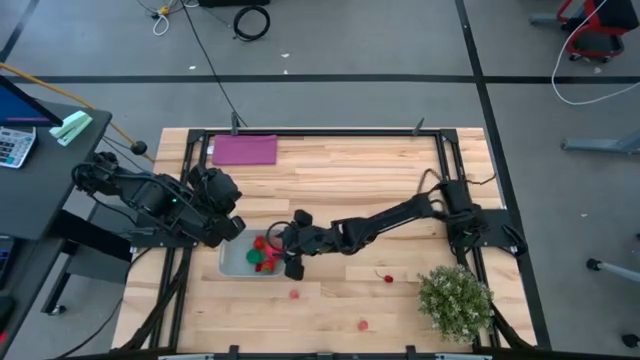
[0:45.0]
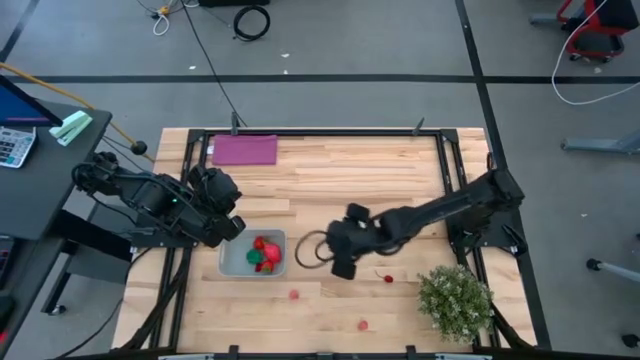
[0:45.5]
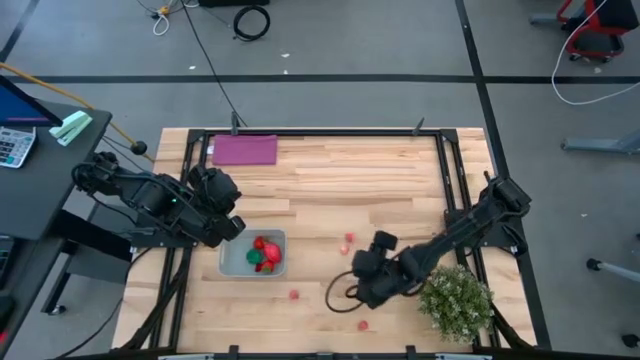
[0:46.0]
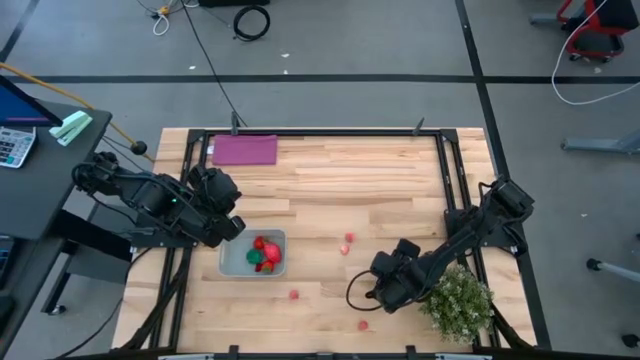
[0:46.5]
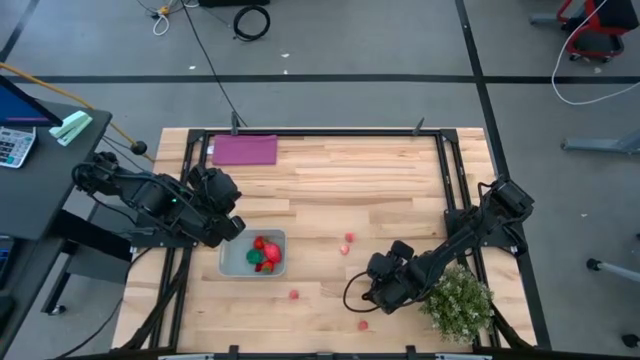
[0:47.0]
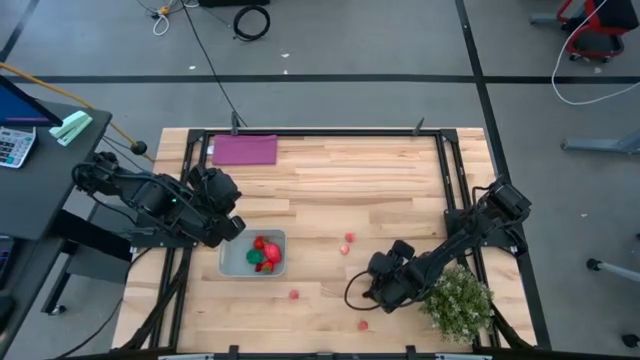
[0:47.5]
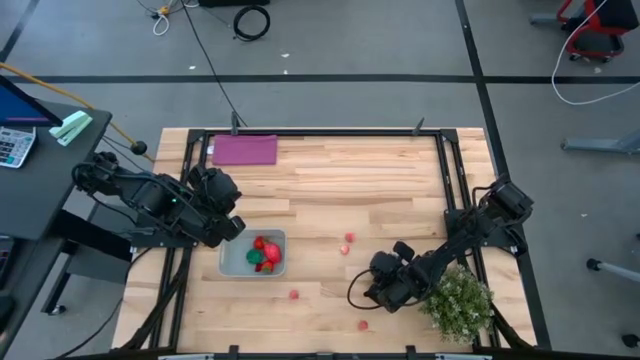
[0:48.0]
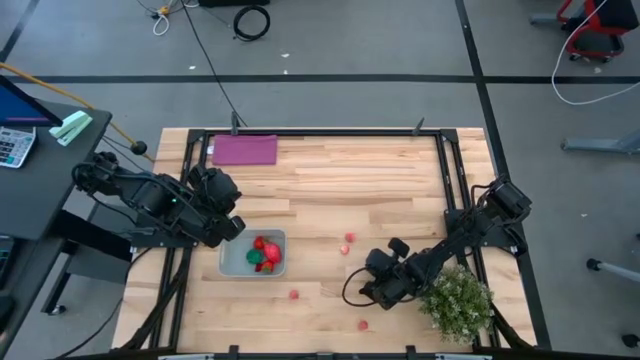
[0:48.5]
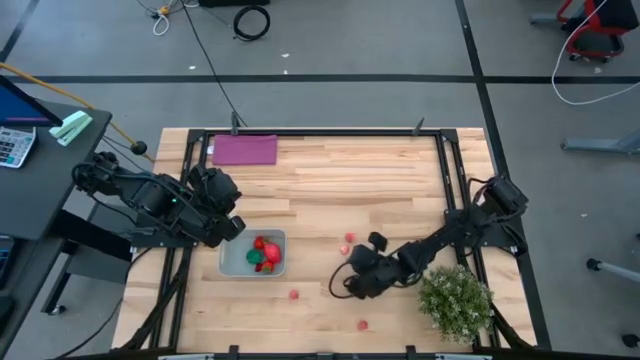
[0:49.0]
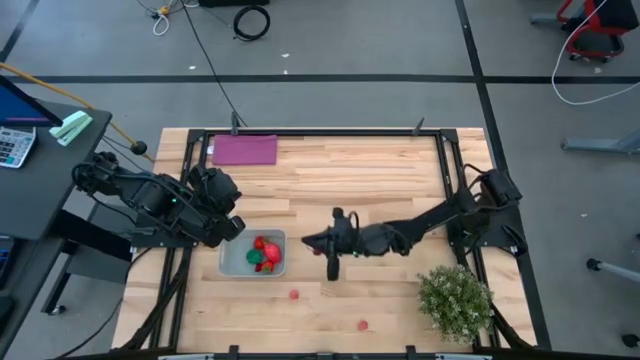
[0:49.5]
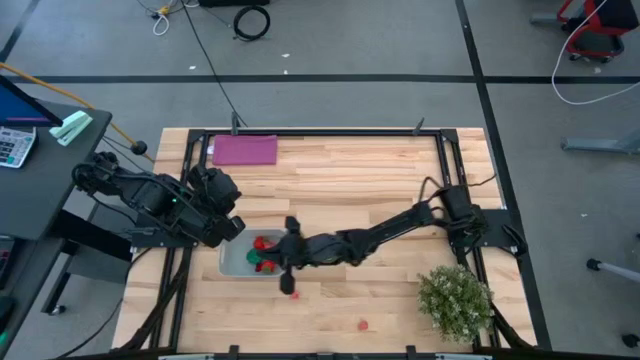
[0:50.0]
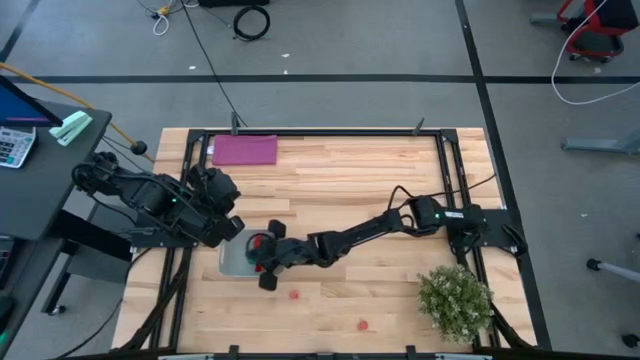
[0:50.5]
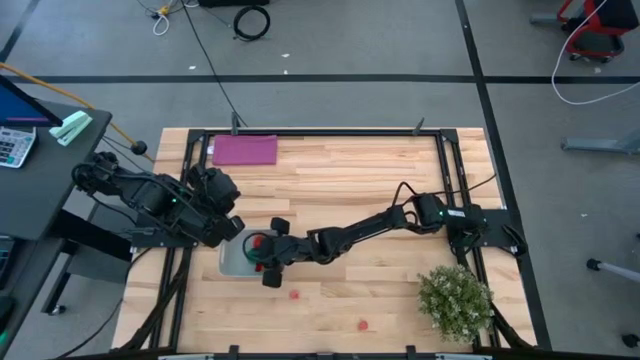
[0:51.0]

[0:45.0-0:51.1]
Task: Pick and placing Produce into tupperware
Put the red cherry into the gray container

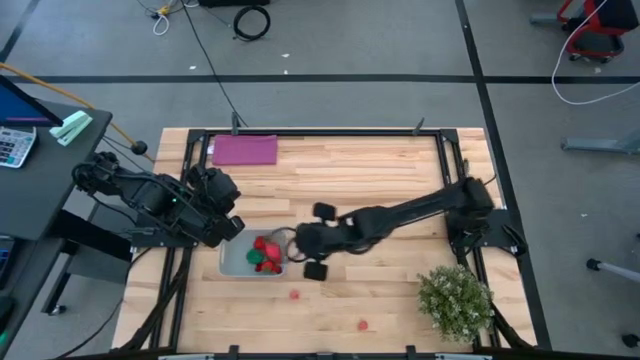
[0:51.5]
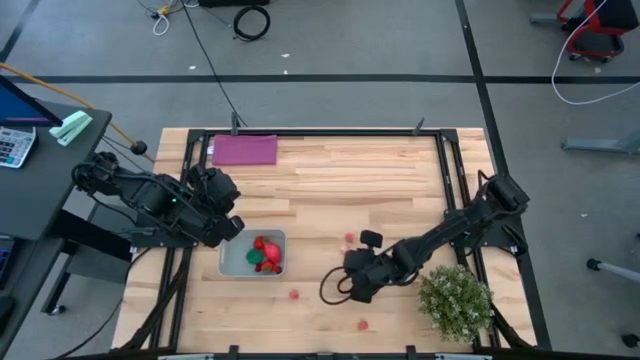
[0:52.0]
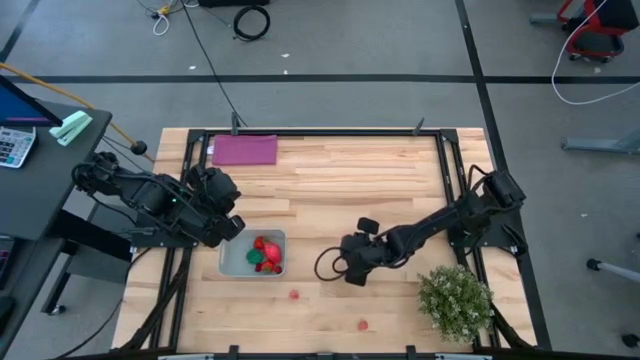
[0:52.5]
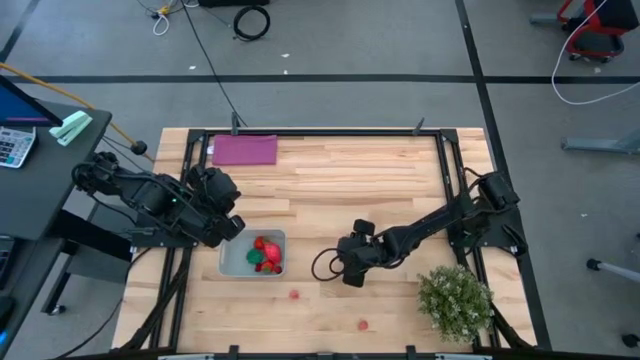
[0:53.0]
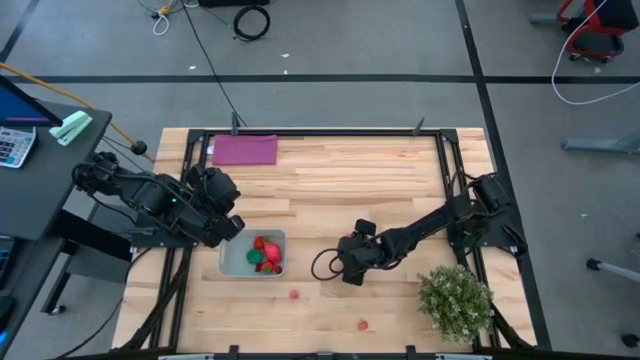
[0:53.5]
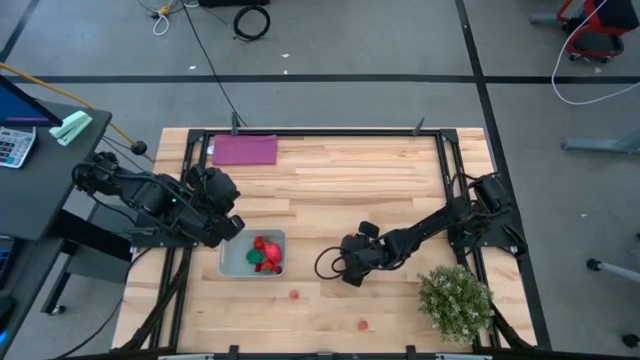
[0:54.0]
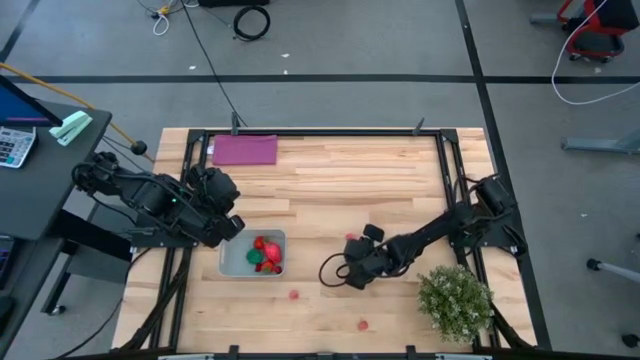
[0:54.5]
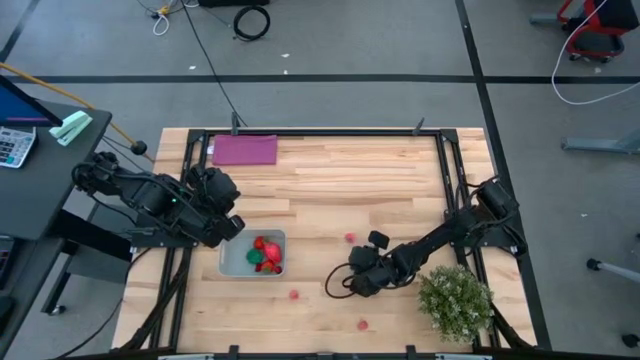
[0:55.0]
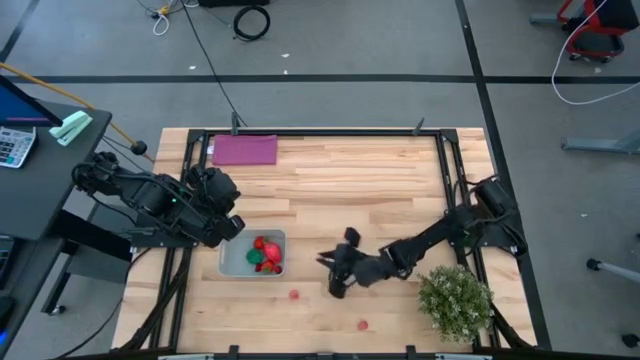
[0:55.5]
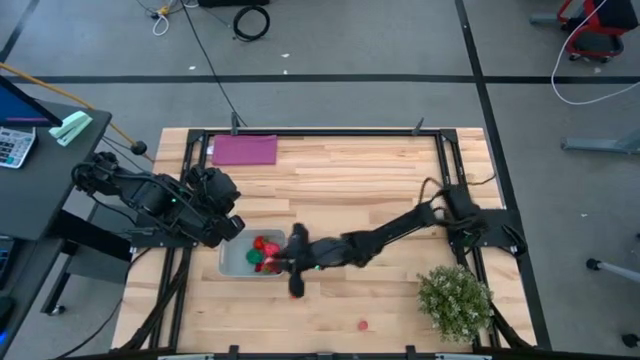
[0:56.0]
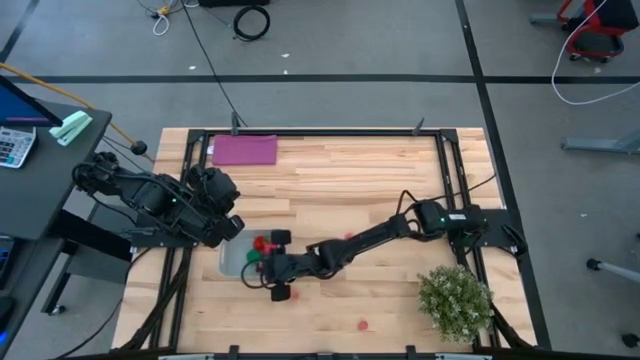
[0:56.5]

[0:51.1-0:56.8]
Put the lychee into the gray container

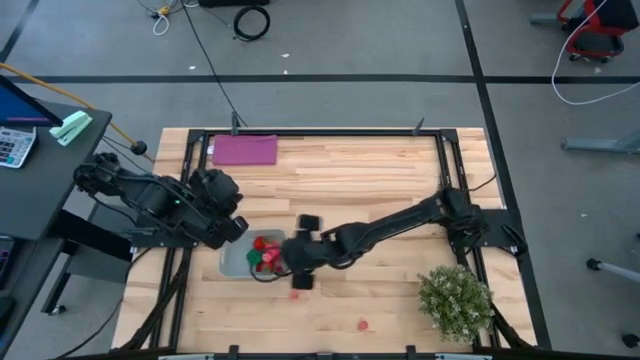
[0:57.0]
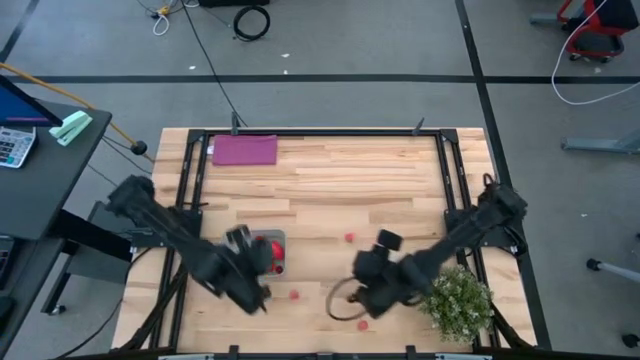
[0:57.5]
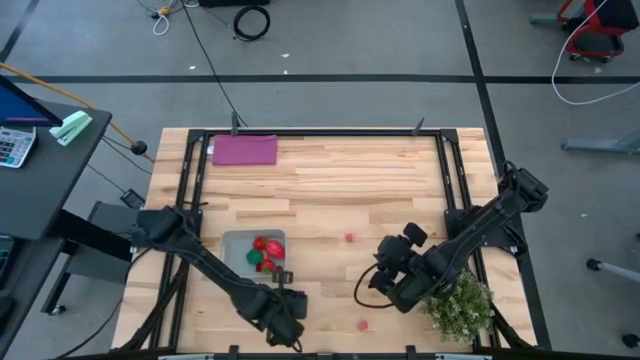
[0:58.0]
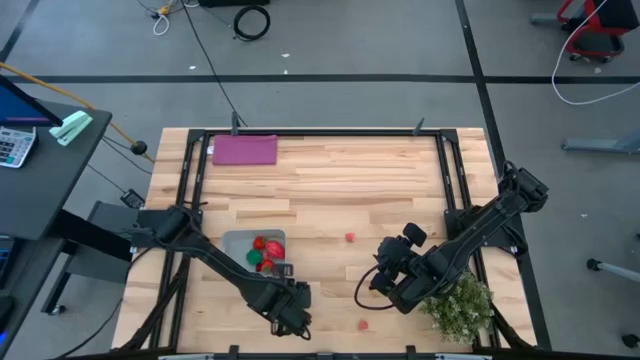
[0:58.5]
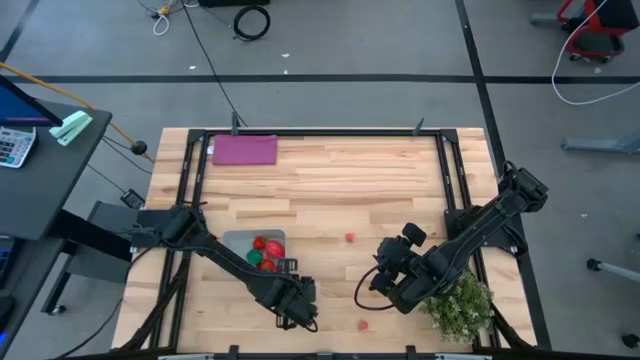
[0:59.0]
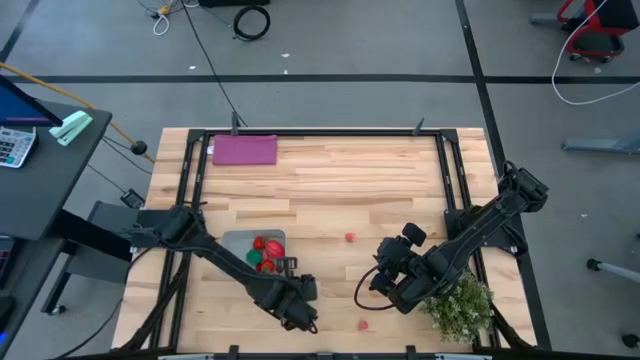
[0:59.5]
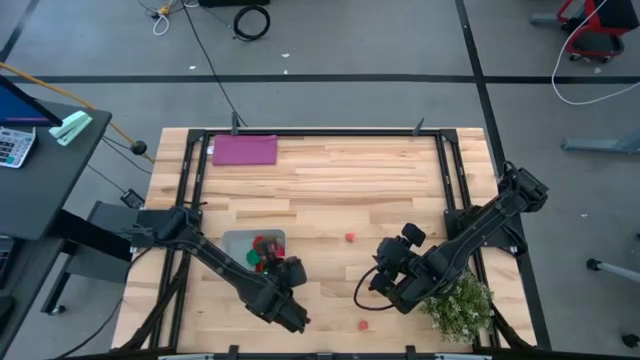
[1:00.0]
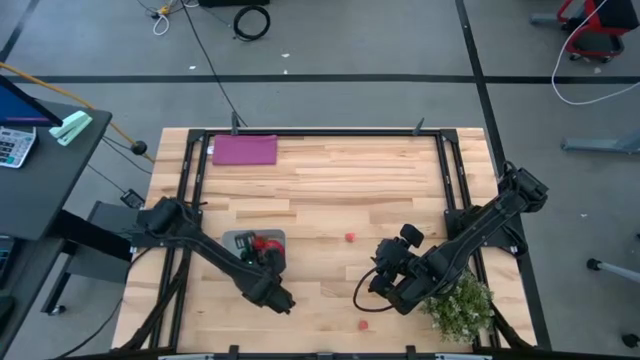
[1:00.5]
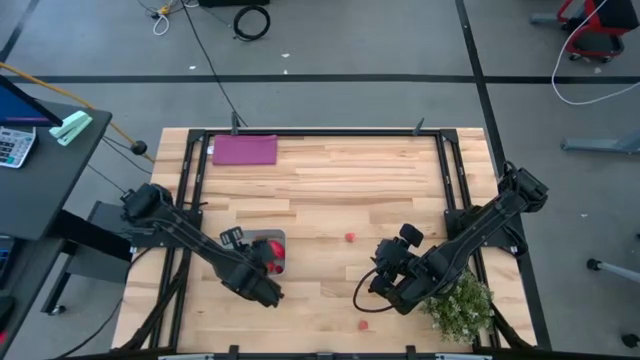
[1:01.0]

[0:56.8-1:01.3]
Put the lychee into the gray container

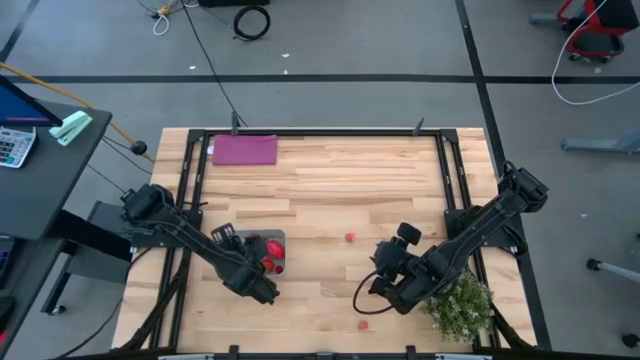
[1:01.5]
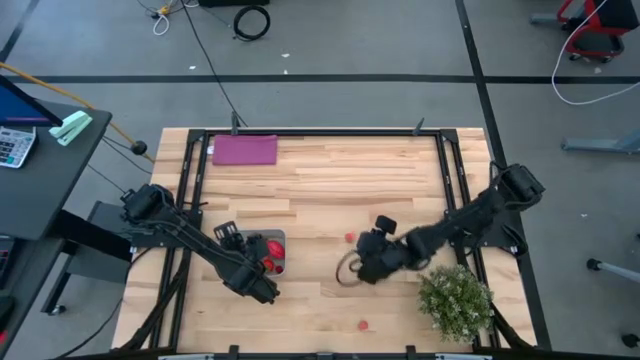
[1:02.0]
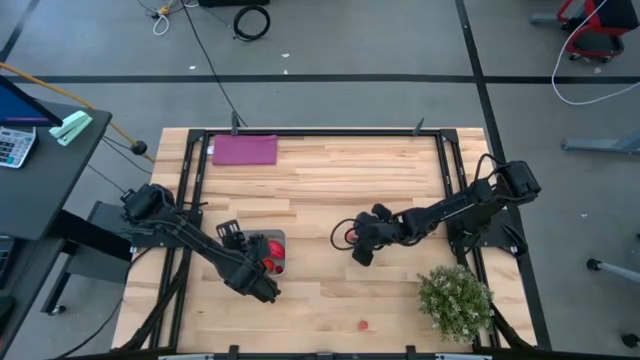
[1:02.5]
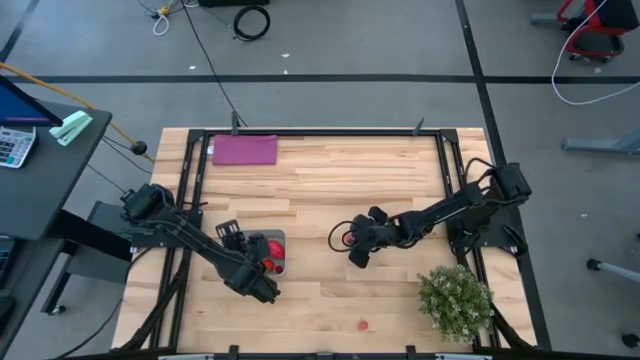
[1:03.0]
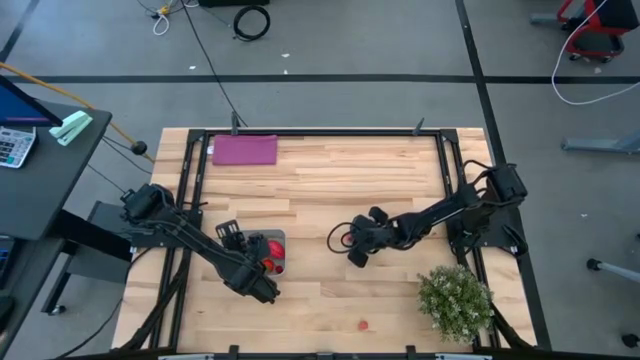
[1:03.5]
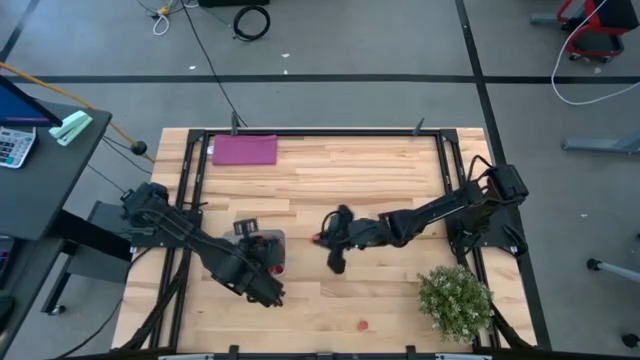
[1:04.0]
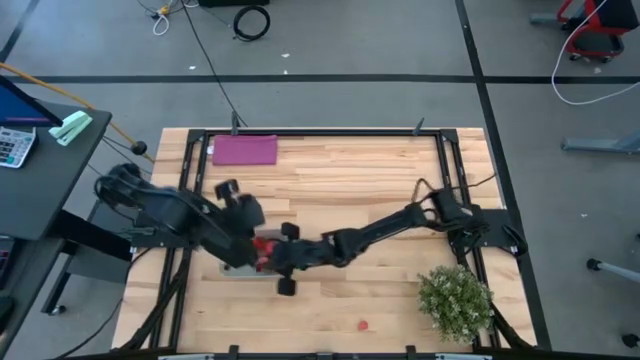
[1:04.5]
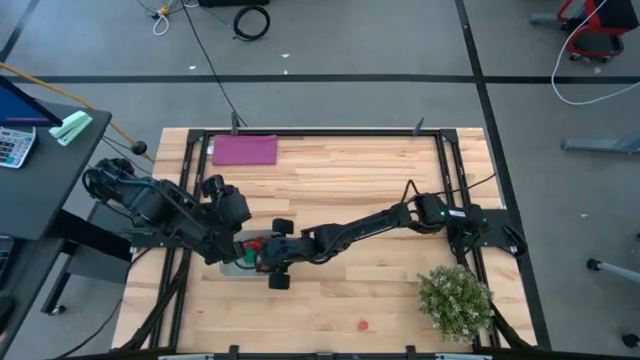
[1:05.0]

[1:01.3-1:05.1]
Put the lychee into the gray container
